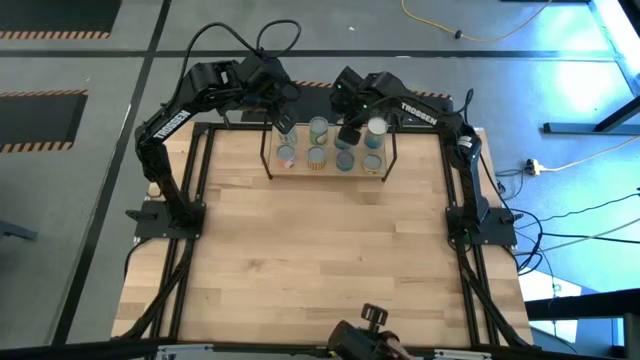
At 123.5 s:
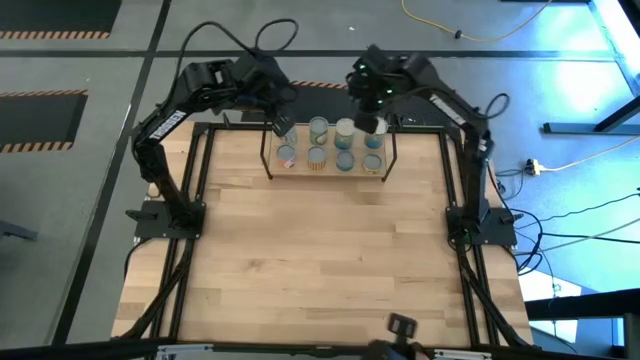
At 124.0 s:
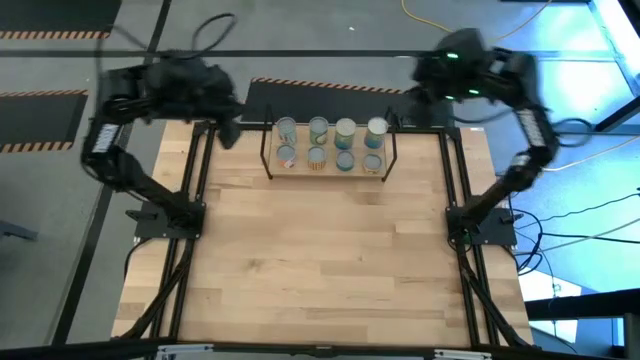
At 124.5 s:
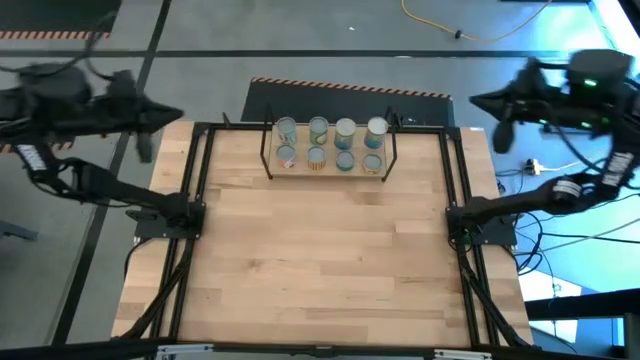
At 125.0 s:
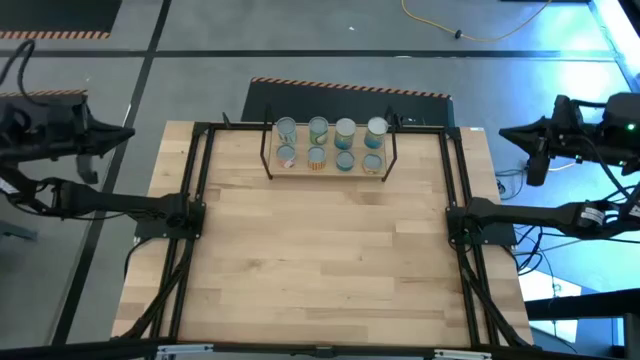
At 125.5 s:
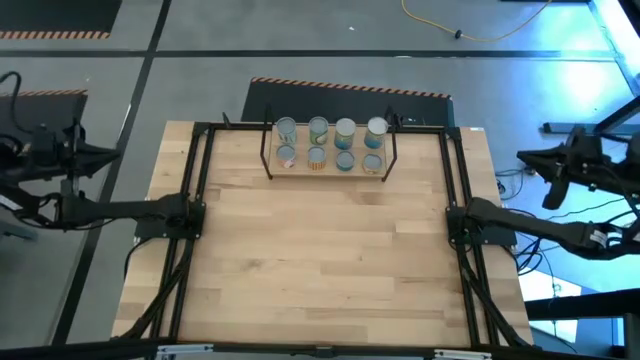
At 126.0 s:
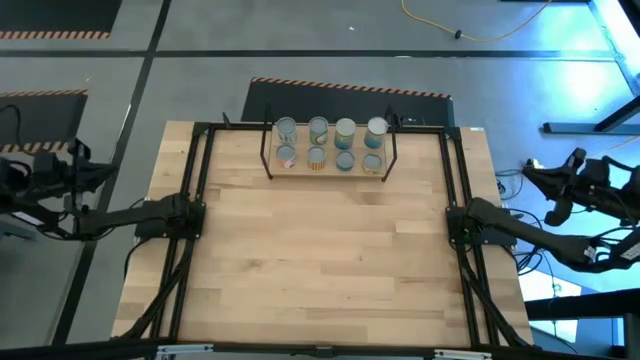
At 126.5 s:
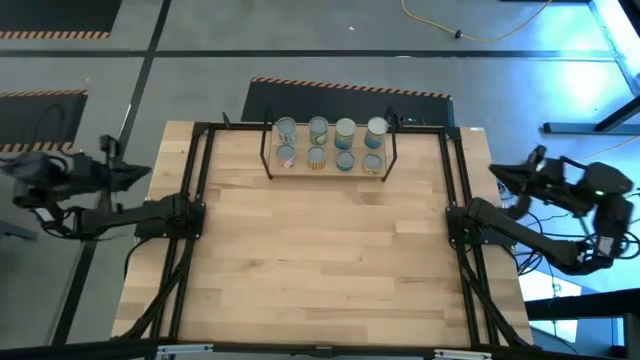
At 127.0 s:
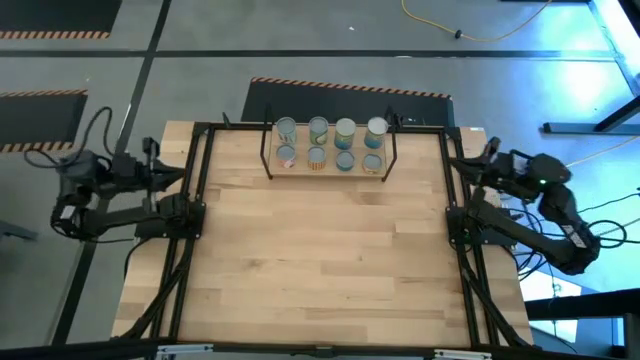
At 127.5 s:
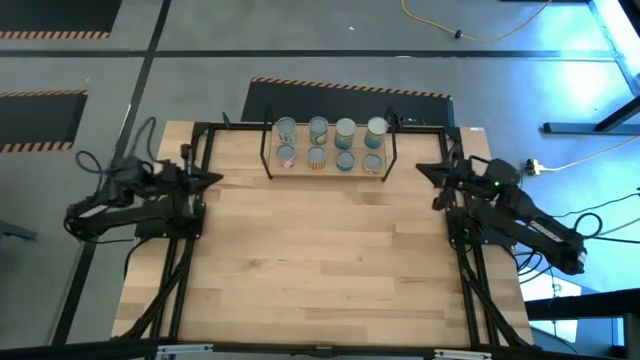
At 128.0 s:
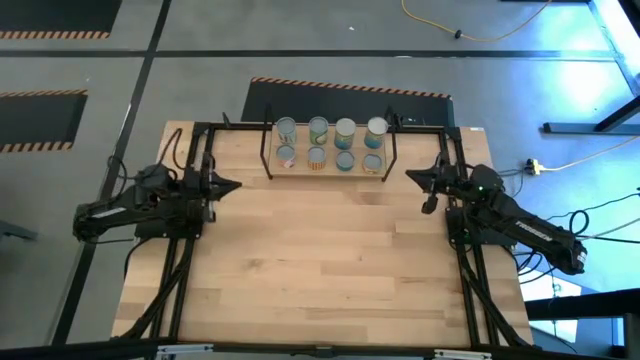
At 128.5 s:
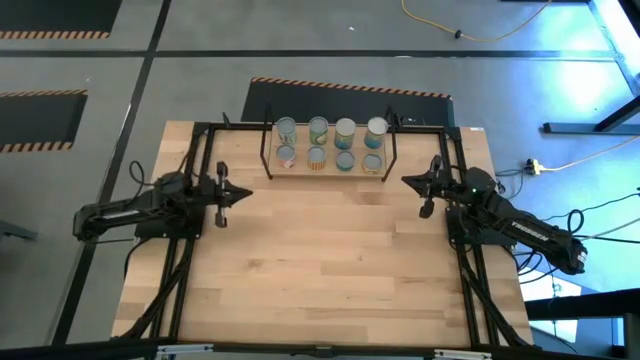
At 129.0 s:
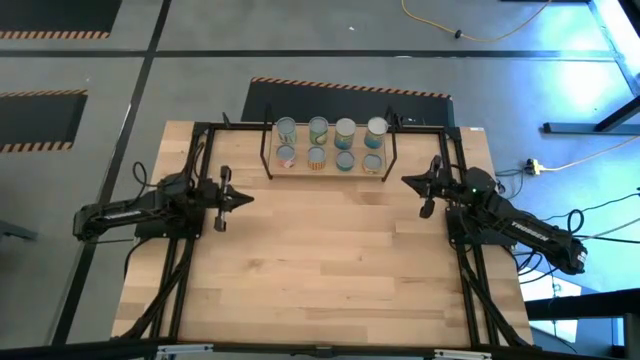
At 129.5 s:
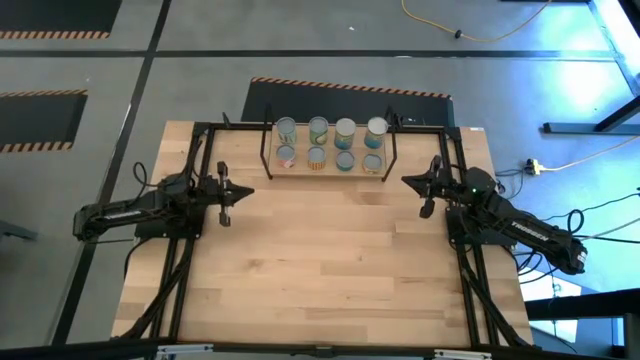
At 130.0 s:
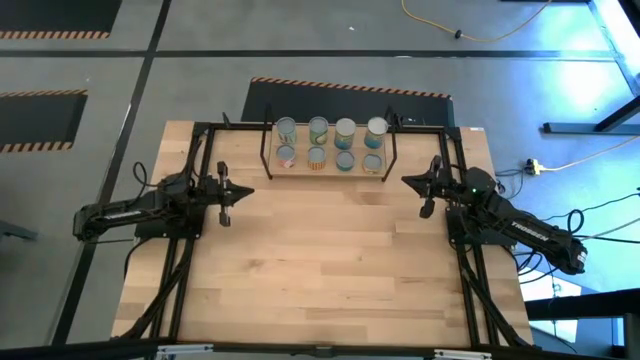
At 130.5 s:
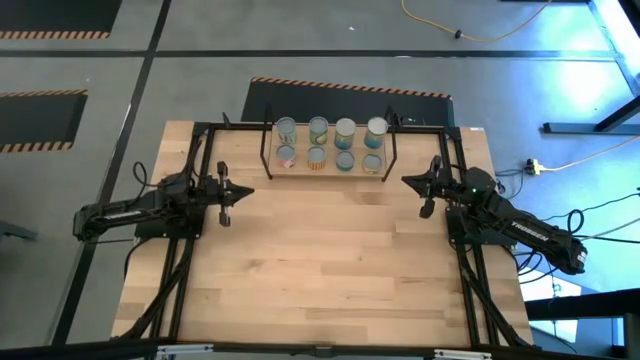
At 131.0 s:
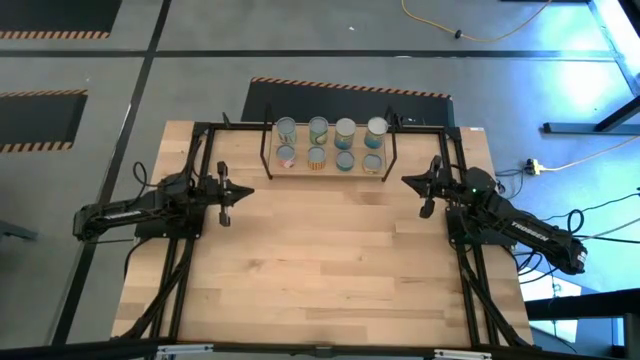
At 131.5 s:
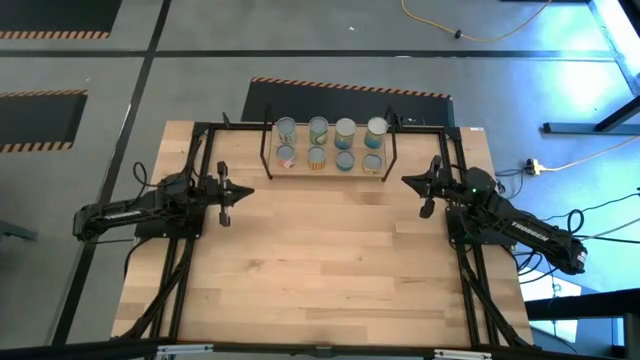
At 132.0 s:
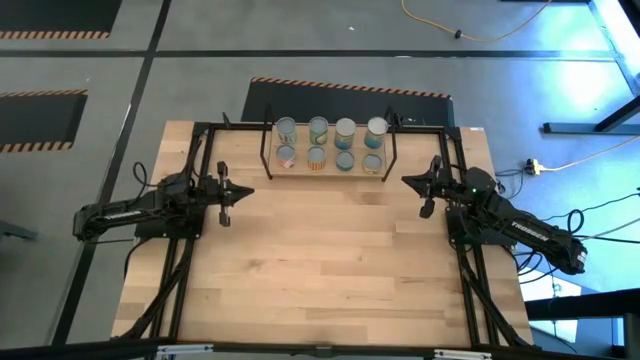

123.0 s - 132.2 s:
Task: Pick and place cans onto a shelf
Return to Home Position

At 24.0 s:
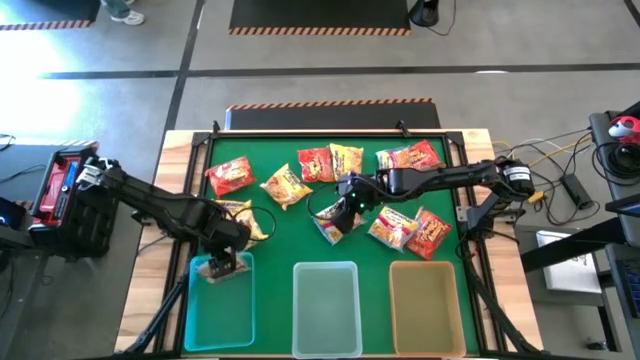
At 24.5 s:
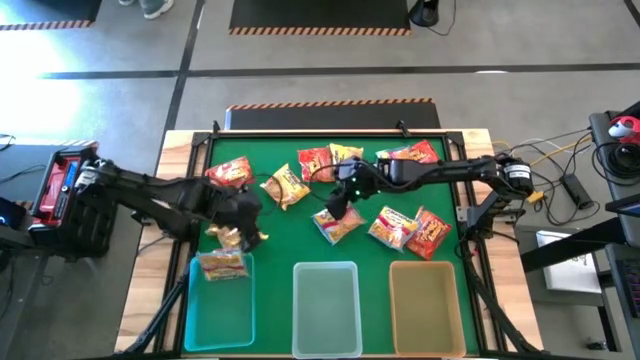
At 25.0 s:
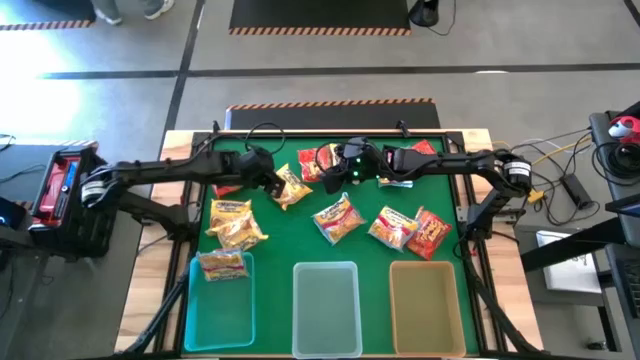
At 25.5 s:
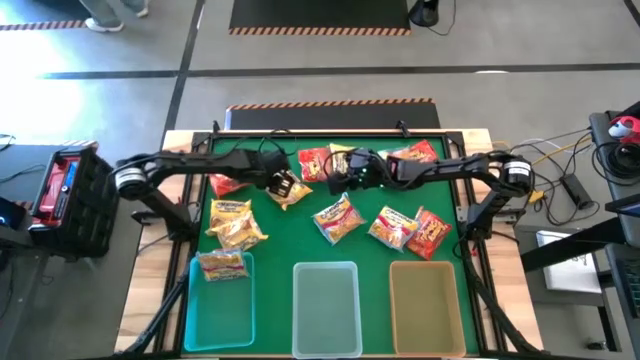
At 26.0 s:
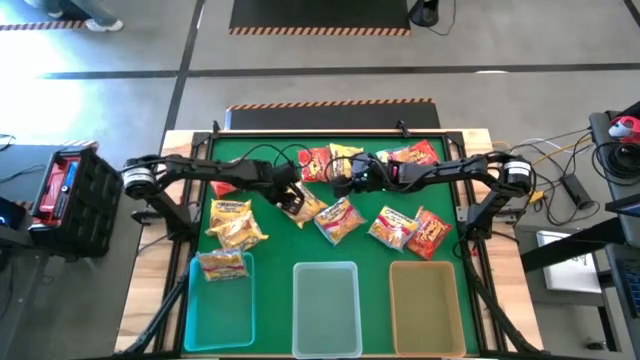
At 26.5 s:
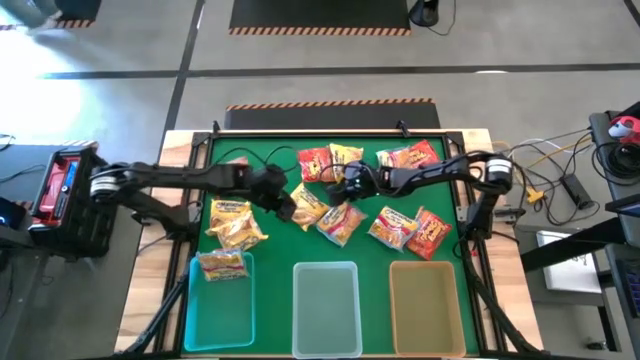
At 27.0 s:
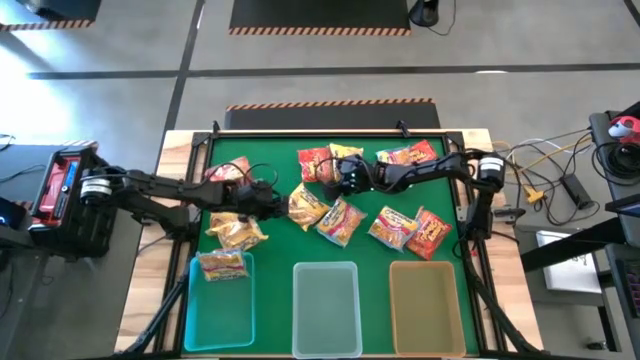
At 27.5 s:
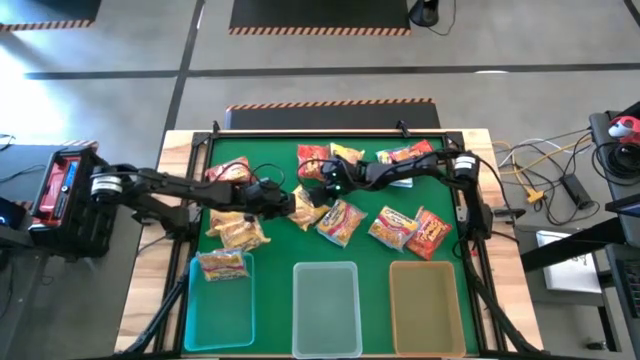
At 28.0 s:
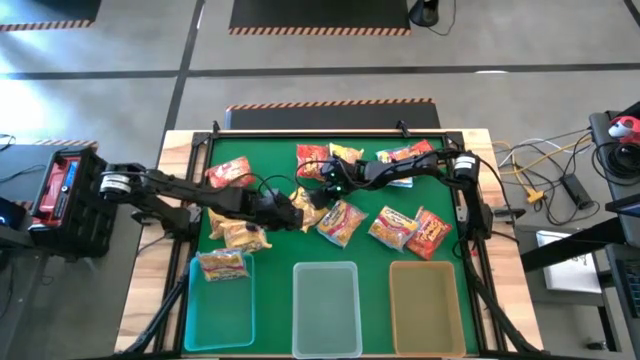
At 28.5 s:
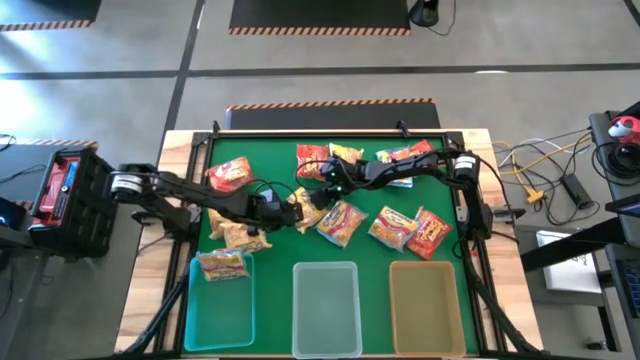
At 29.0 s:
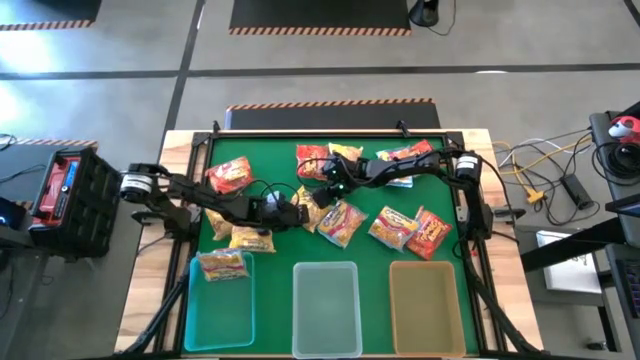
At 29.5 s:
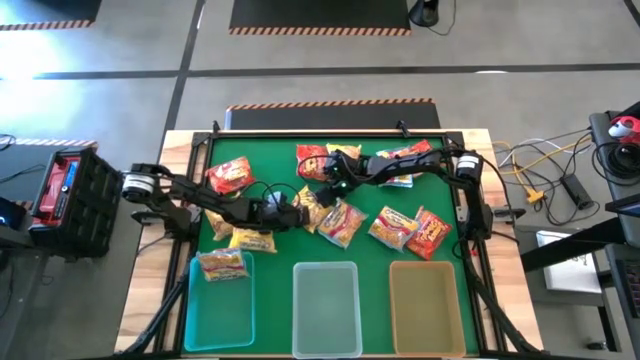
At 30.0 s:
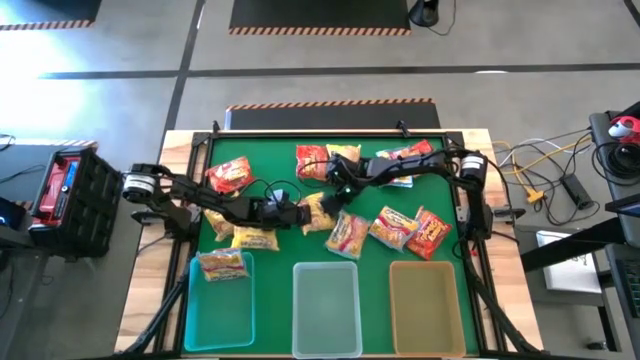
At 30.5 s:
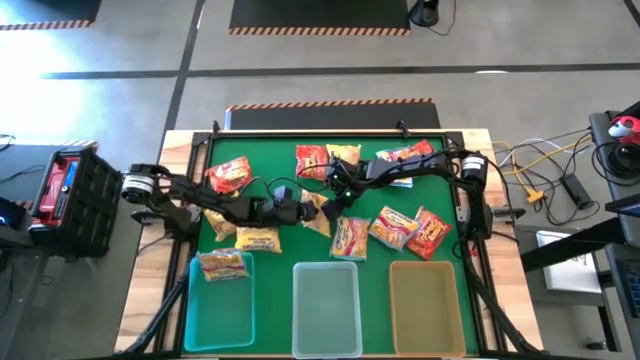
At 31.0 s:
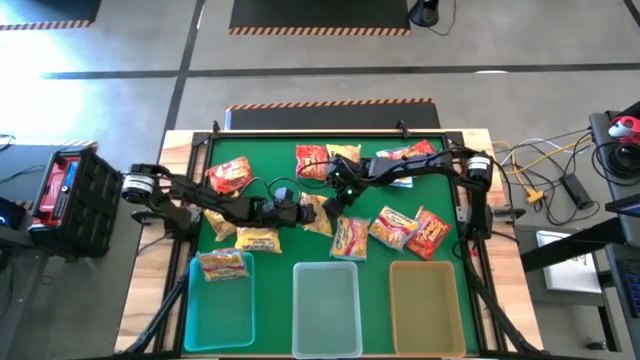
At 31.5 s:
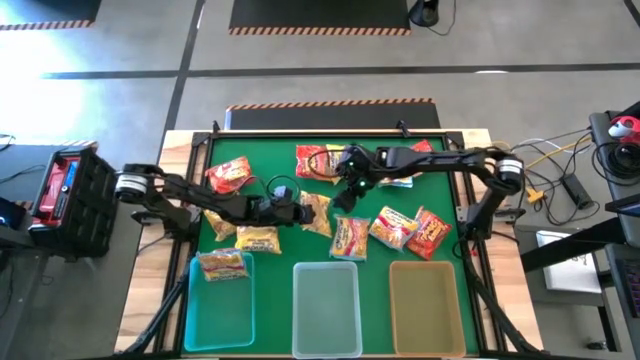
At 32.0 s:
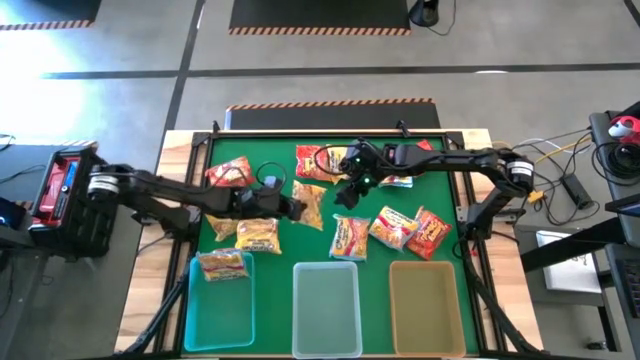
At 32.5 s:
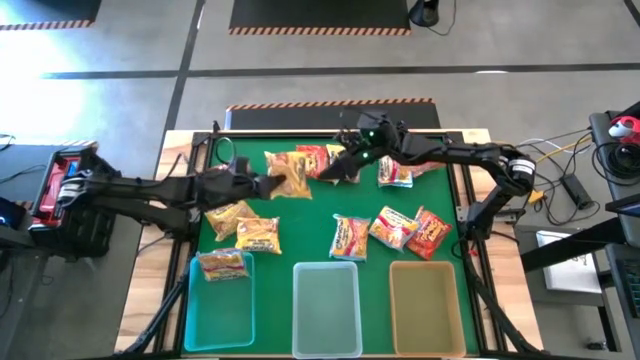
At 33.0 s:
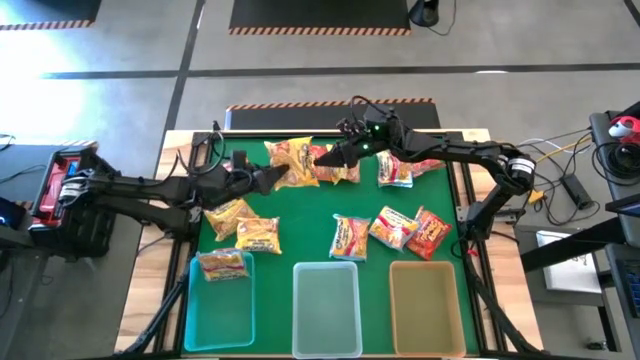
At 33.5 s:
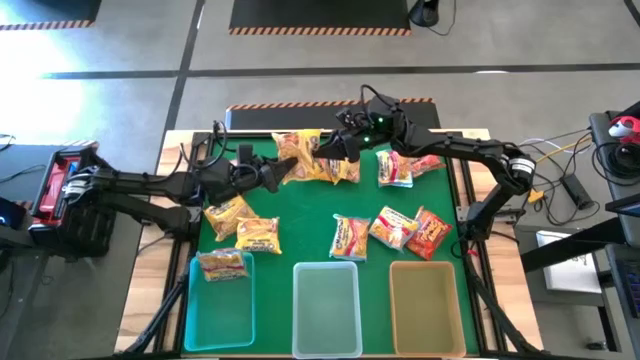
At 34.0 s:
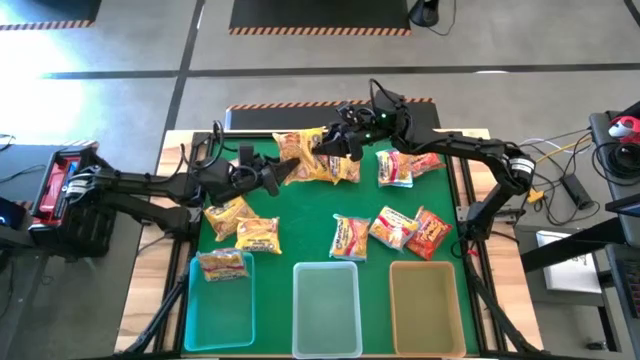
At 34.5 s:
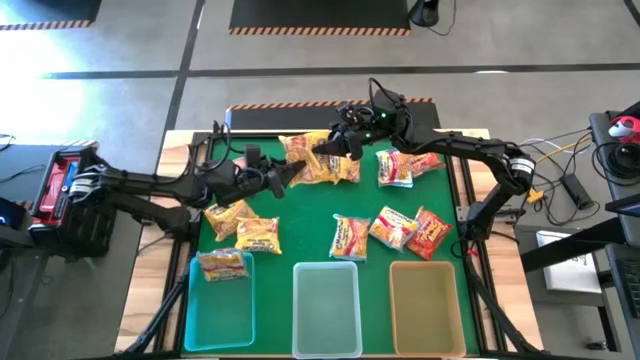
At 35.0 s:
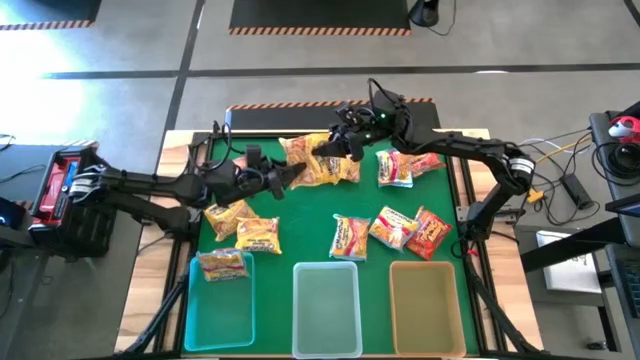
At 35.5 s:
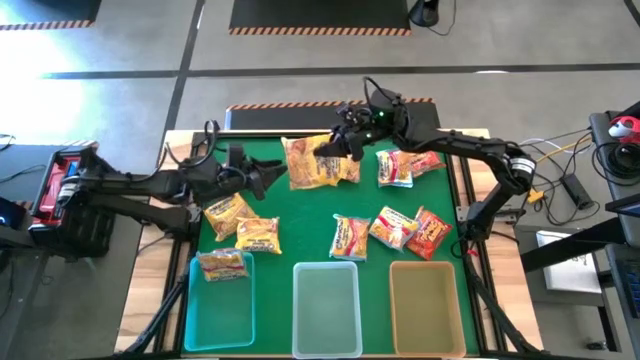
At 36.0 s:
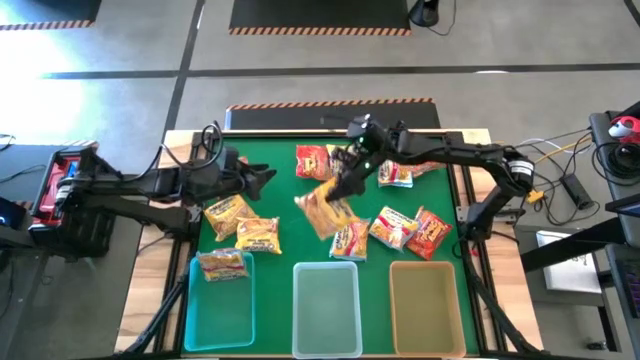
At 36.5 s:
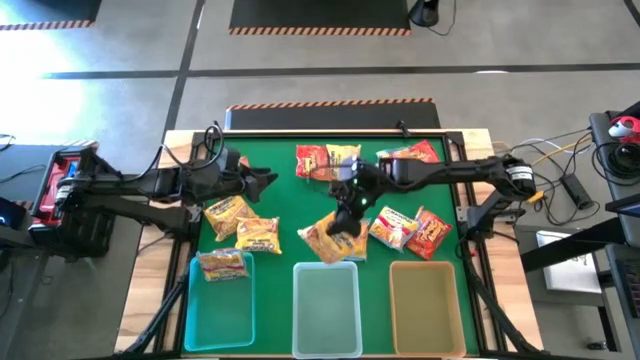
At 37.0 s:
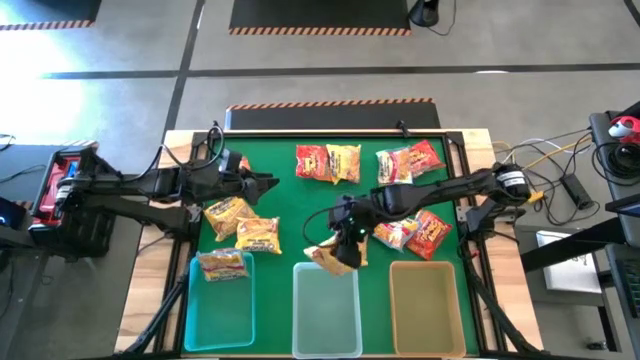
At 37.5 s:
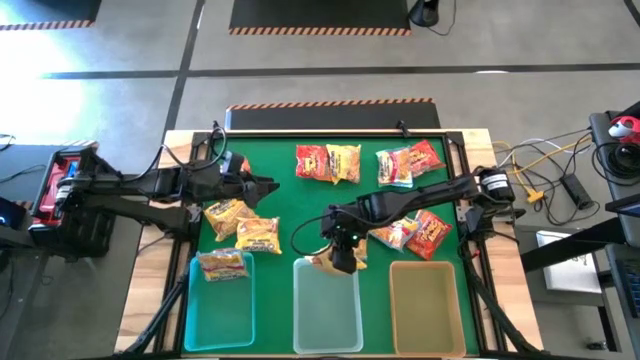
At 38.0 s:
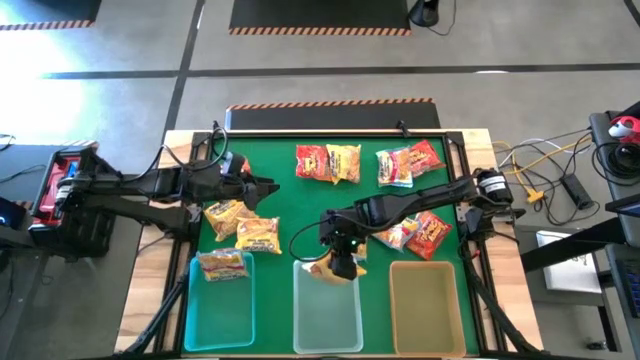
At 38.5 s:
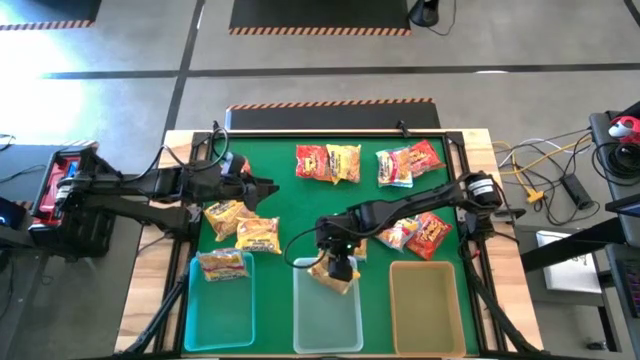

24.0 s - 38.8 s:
Task: Sort Maruchan noodles
Put the yellow noodle pack into the transparent bin
